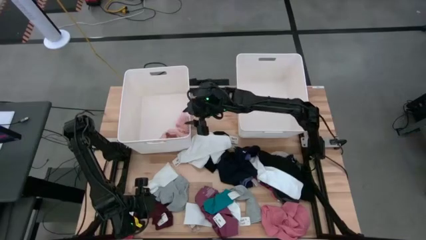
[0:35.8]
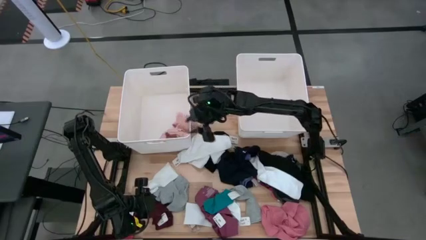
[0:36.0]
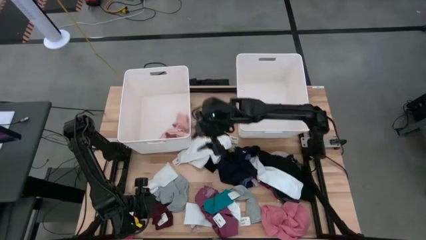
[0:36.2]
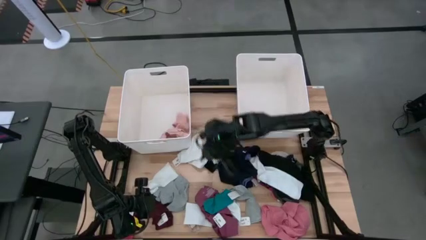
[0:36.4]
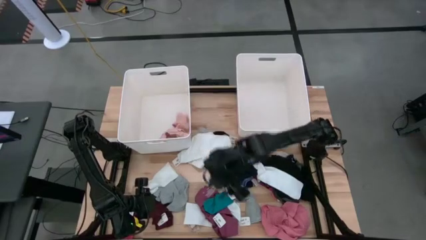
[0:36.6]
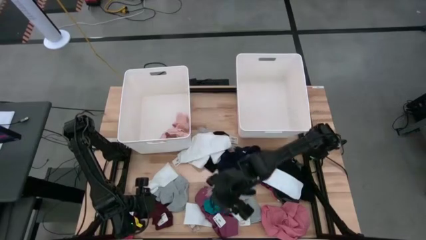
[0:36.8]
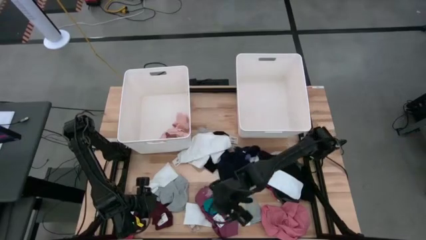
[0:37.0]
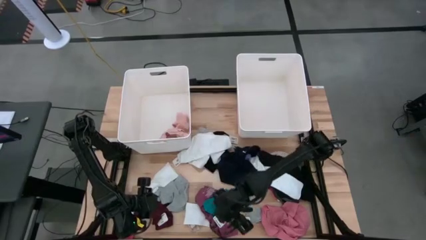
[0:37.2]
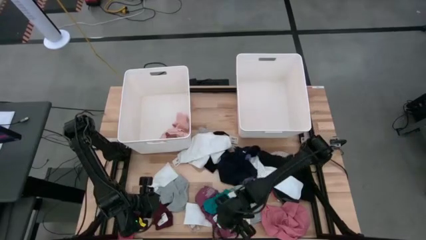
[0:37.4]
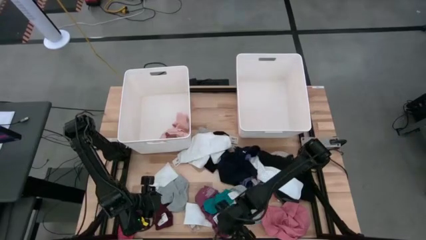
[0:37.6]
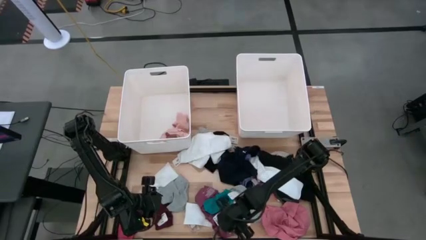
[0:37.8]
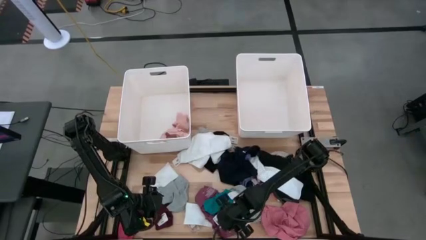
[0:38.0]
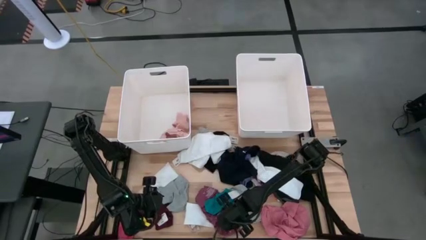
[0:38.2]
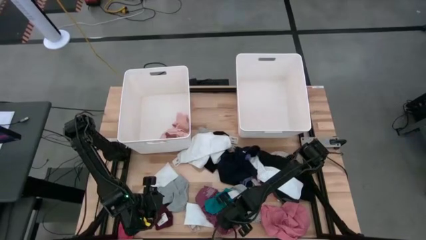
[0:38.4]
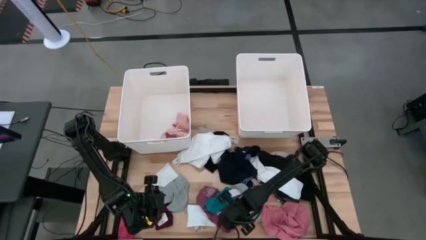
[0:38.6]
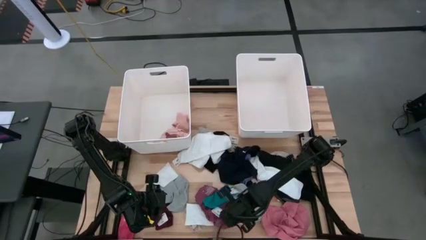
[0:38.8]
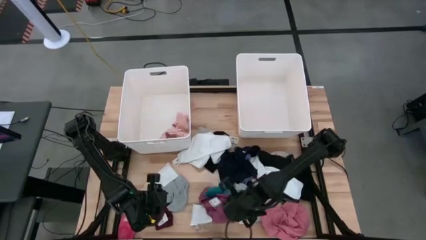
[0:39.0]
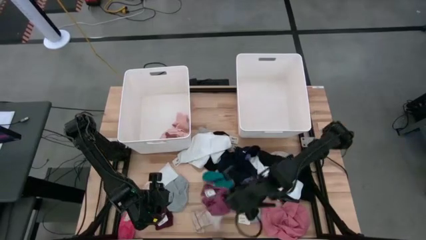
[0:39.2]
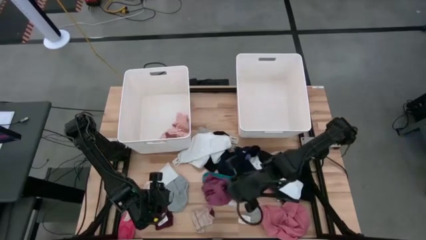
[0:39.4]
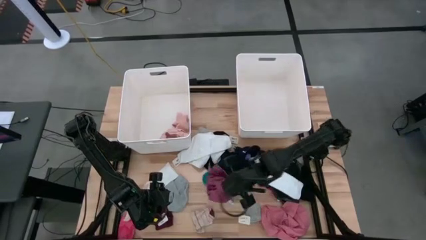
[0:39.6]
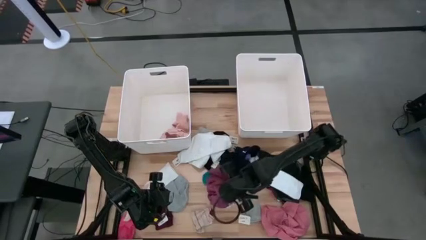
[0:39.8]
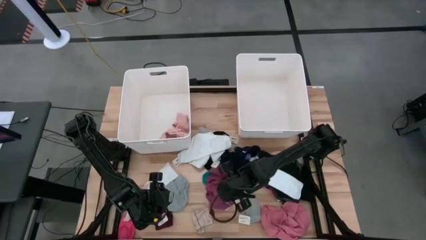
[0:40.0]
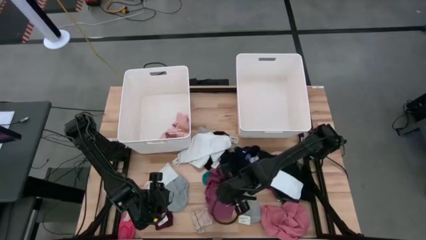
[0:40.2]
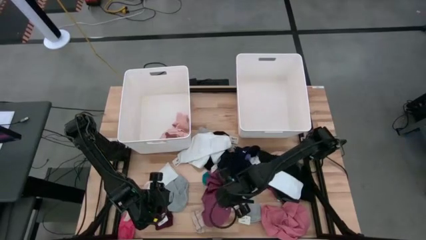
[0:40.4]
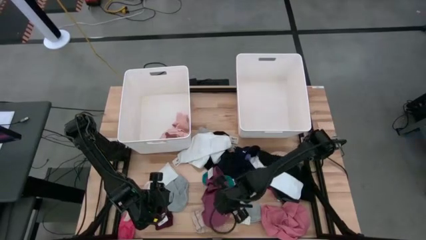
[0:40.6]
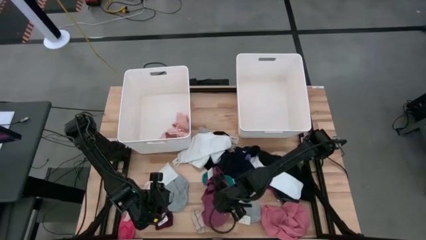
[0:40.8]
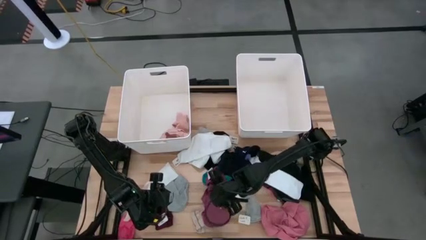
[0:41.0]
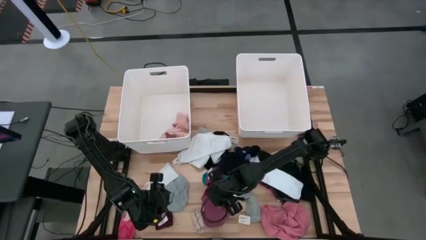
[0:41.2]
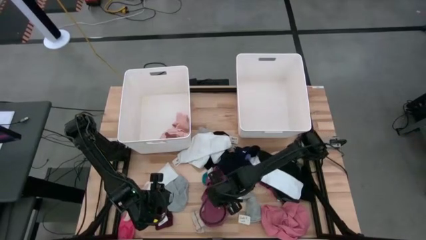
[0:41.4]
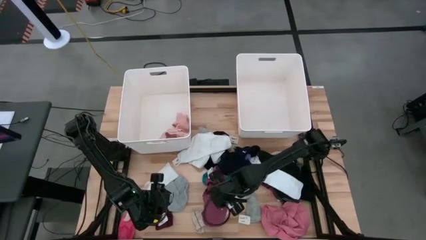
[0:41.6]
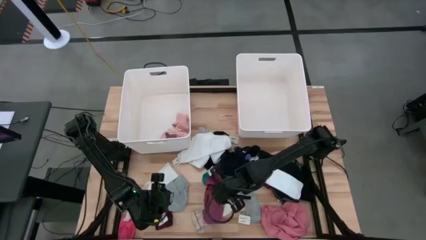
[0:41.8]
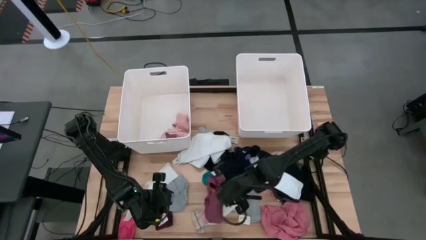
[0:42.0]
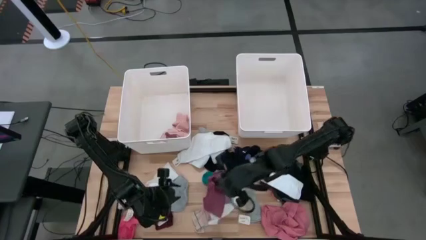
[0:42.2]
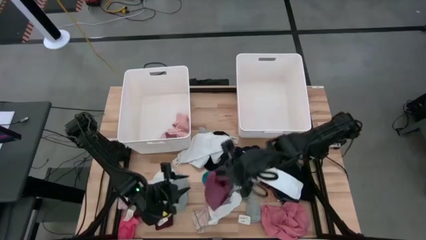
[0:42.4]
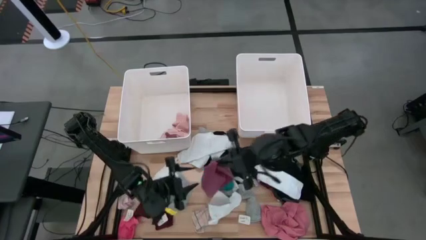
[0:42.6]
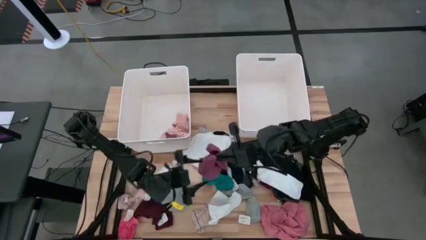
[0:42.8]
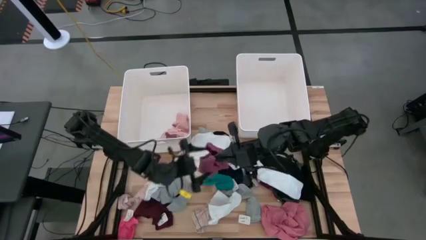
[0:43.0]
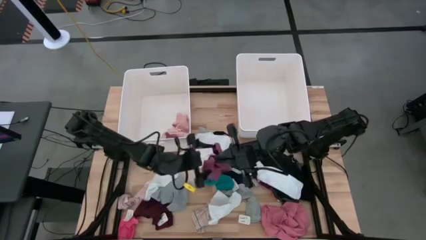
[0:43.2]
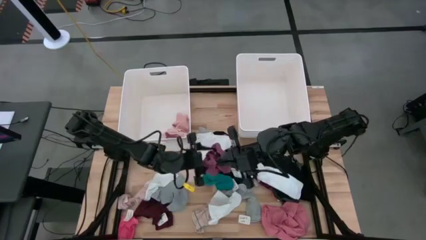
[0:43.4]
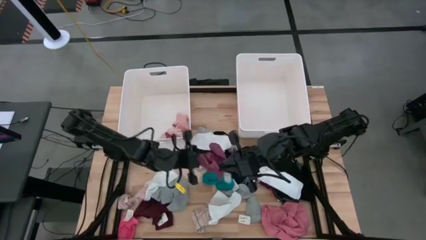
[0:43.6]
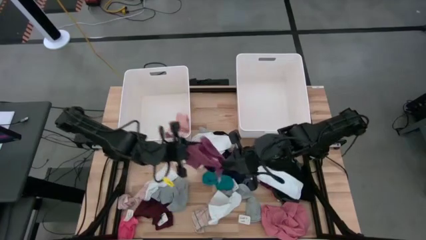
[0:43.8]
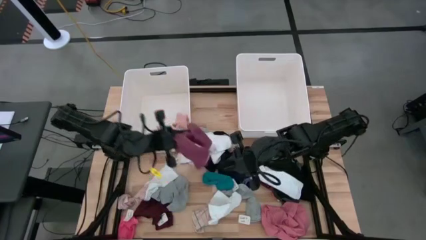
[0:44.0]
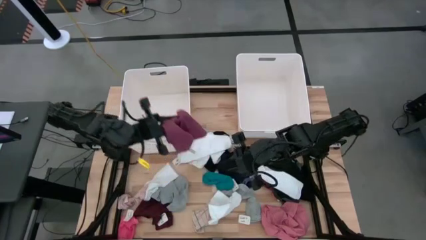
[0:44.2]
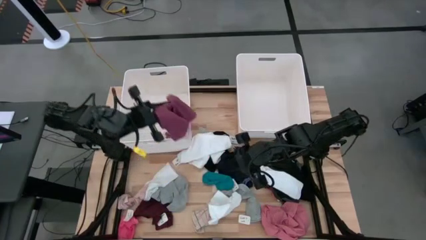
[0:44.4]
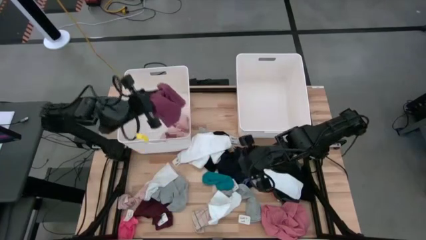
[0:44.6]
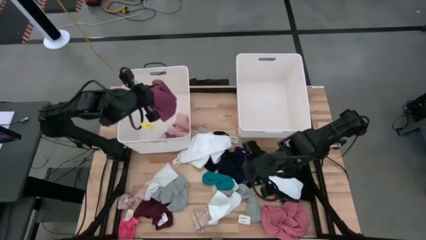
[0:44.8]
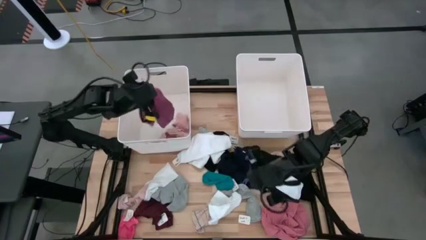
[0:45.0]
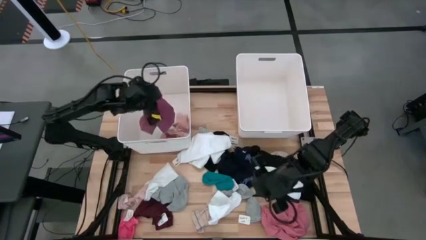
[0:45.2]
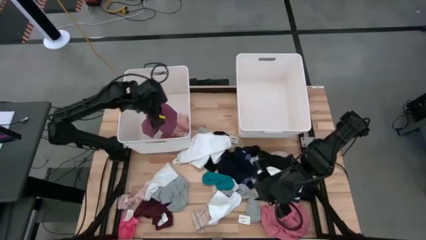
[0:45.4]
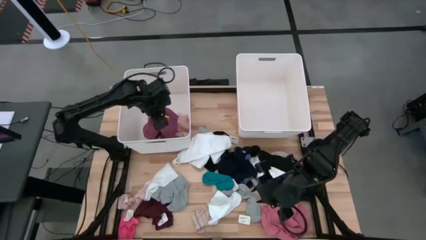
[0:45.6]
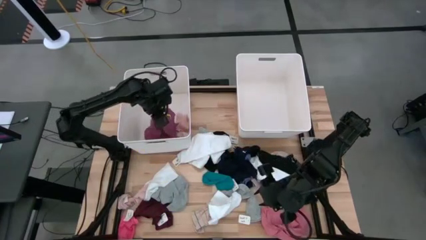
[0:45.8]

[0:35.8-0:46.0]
Task: Sort clothes
Put the red underwear into the left white bin
